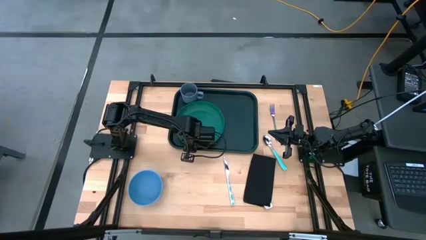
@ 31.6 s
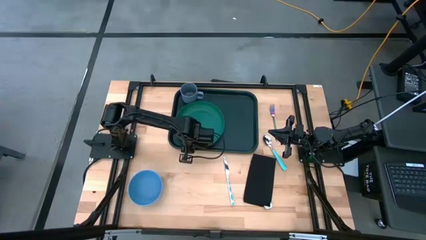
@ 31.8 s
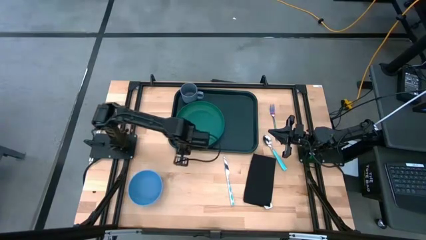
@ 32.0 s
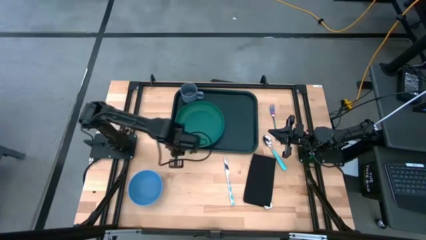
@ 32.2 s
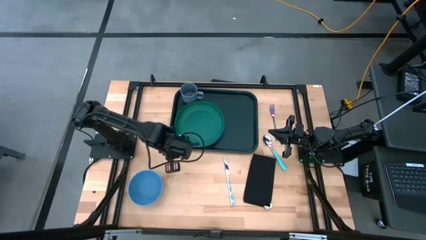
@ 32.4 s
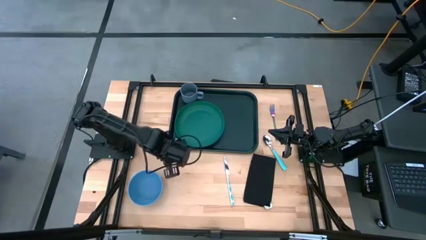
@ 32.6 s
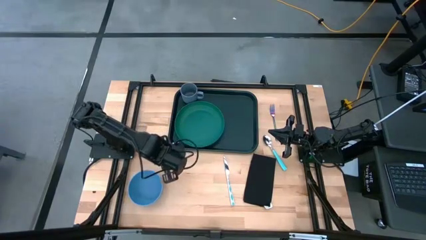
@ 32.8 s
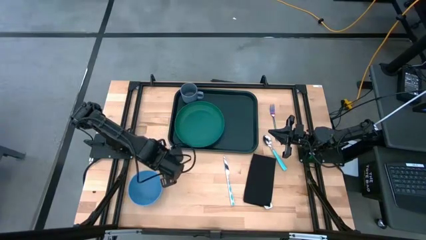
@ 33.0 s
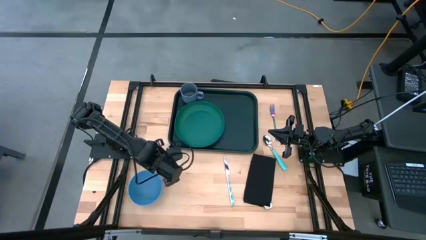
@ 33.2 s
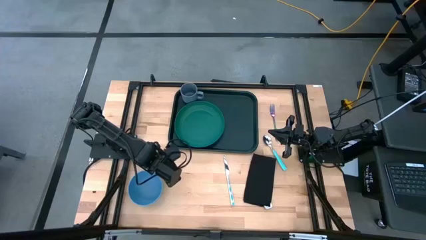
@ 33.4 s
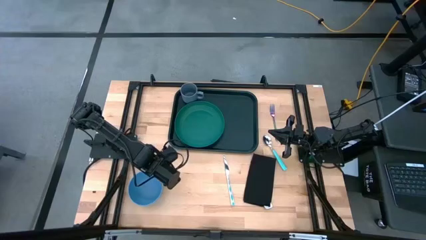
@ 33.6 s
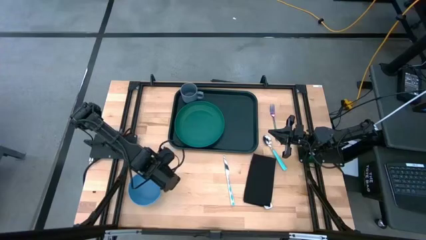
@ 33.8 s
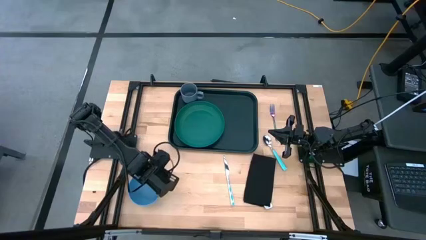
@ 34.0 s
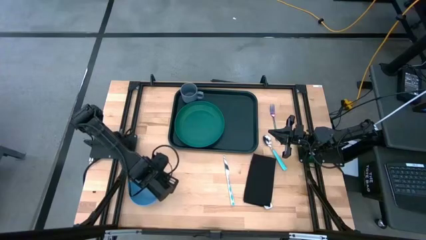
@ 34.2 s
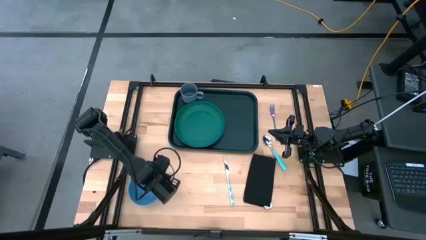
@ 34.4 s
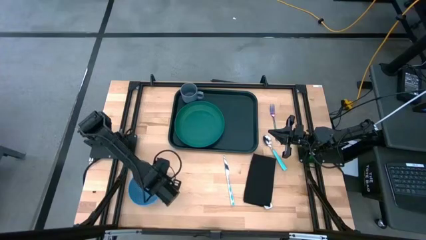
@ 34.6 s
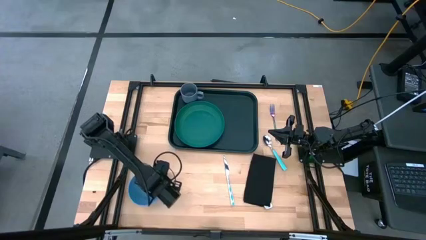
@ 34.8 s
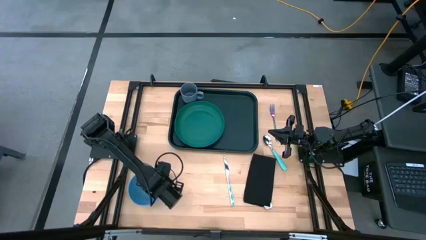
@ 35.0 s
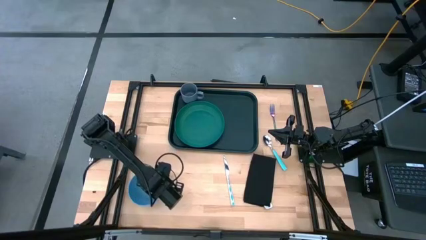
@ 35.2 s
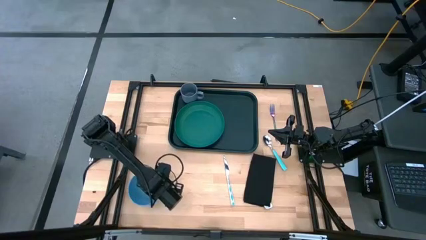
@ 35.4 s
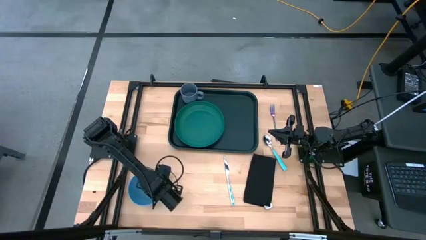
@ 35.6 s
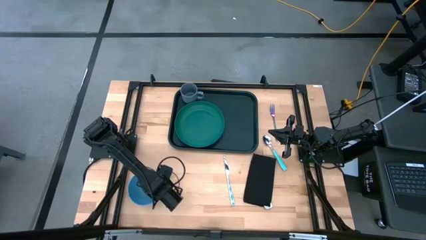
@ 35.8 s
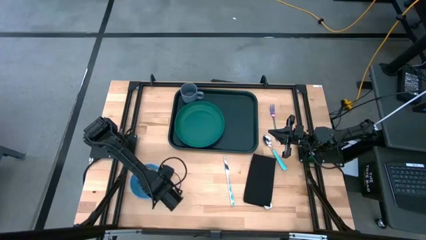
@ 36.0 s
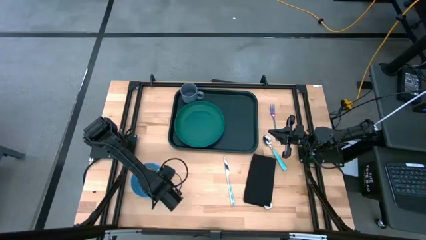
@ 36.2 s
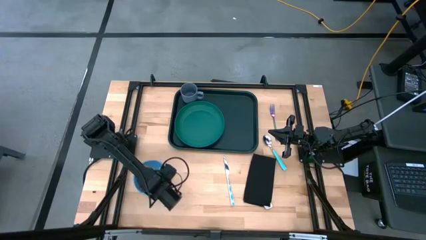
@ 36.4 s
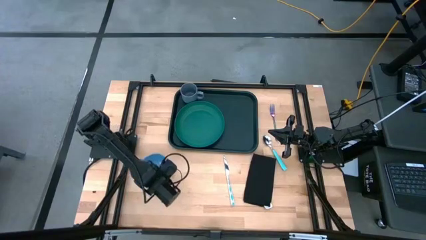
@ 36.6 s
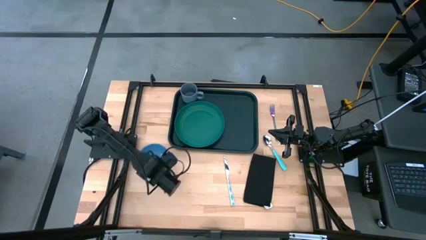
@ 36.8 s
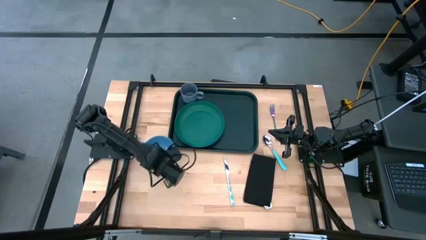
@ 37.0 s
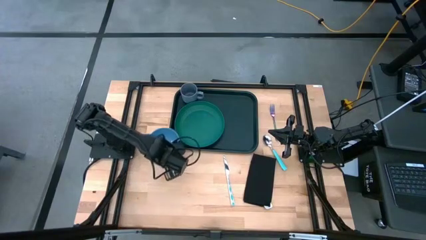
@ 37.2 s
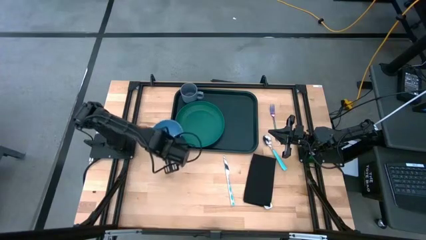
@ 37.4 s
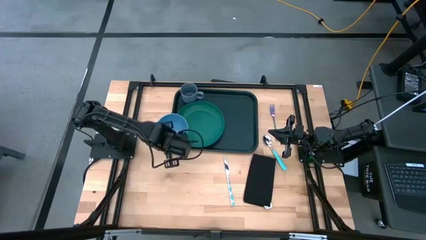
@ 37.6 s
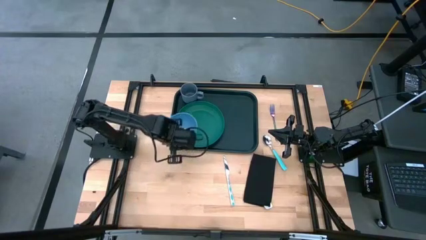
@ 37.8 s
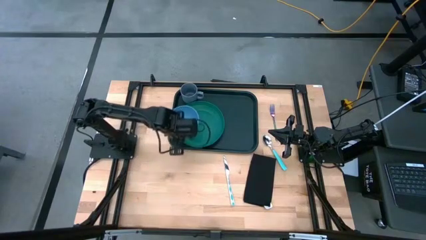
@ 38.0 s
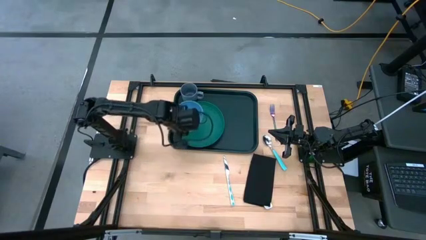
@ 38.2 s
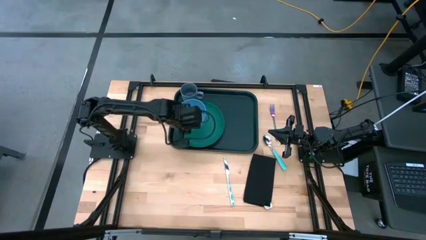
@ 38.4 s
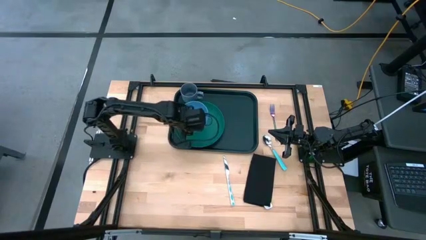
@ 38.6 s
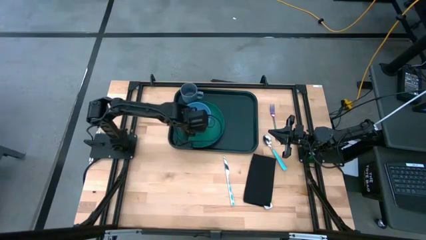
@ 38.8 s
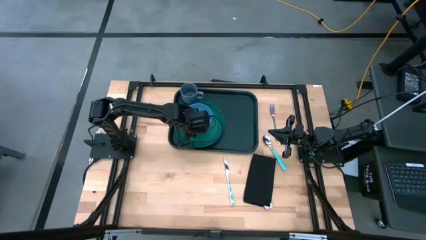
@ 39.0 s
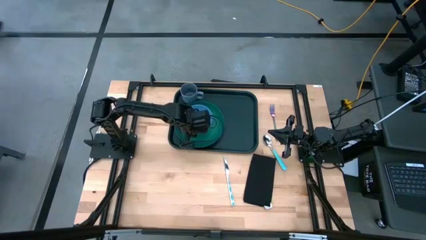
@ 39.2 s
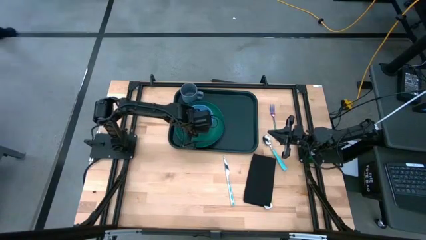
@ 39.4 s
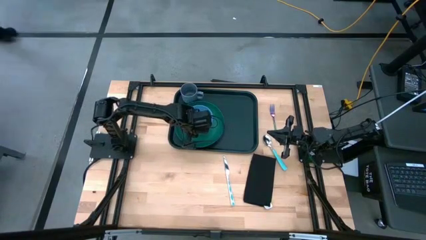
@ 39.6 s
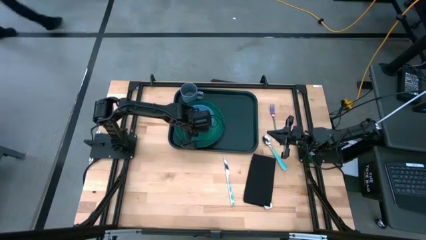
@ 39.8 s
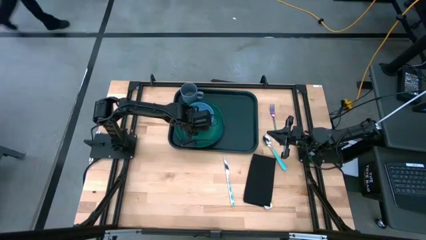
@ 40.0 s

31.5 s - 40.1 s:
Task: Set up tray
Put the blue bowl on the green plate
